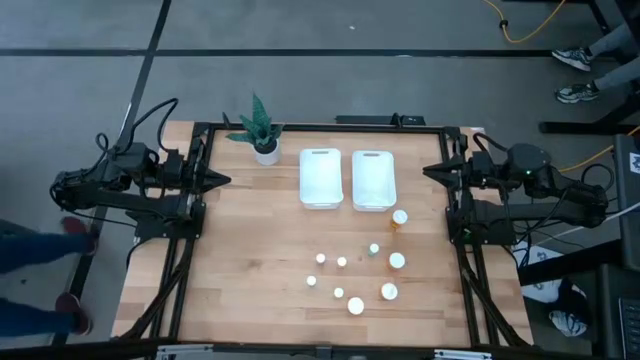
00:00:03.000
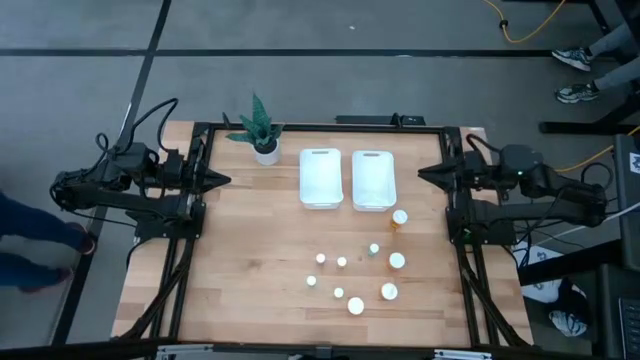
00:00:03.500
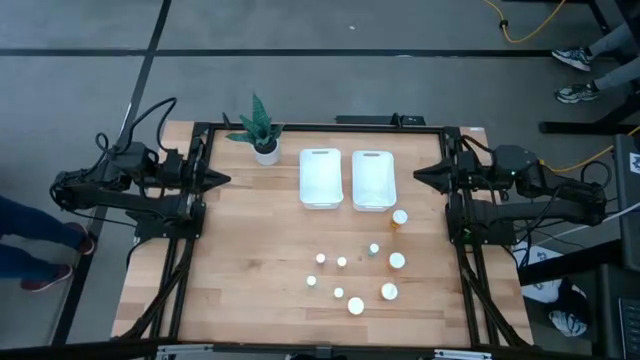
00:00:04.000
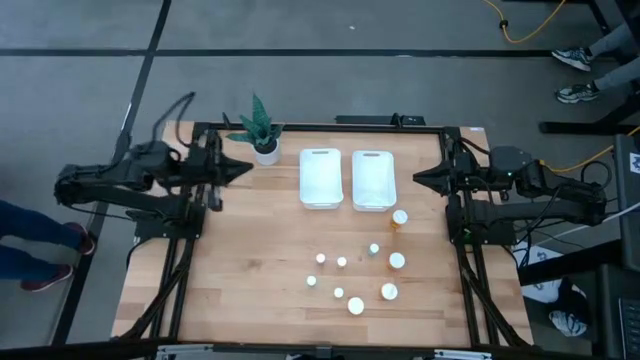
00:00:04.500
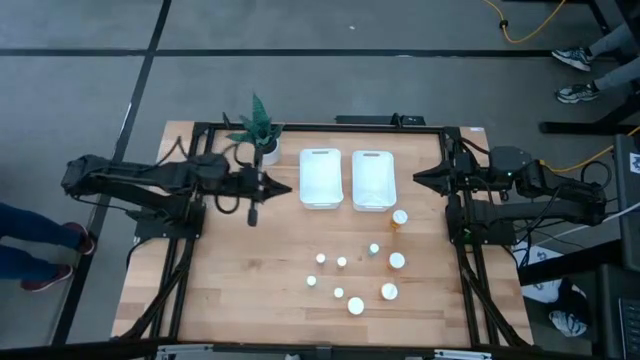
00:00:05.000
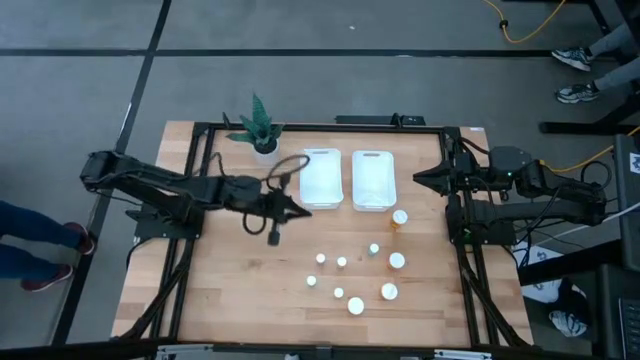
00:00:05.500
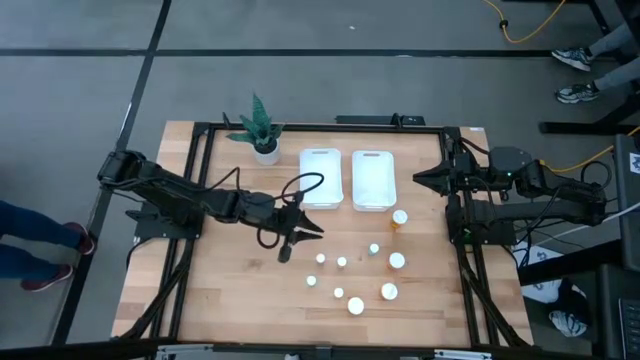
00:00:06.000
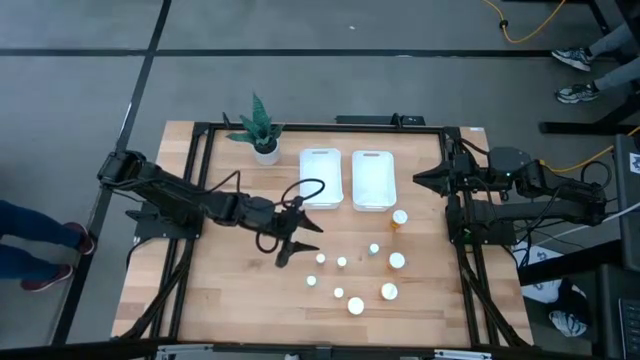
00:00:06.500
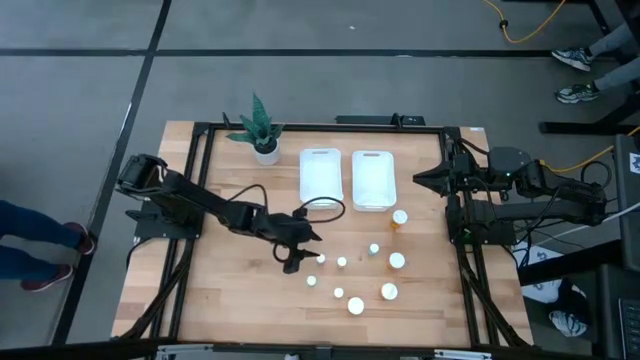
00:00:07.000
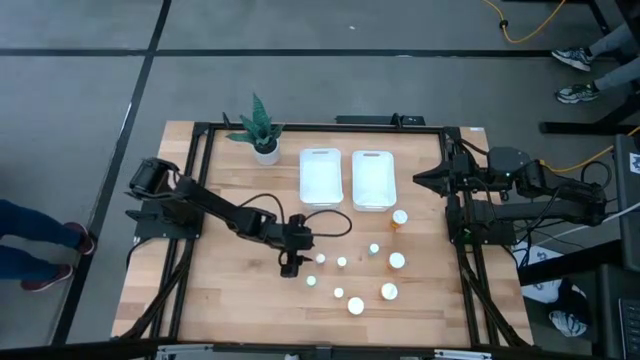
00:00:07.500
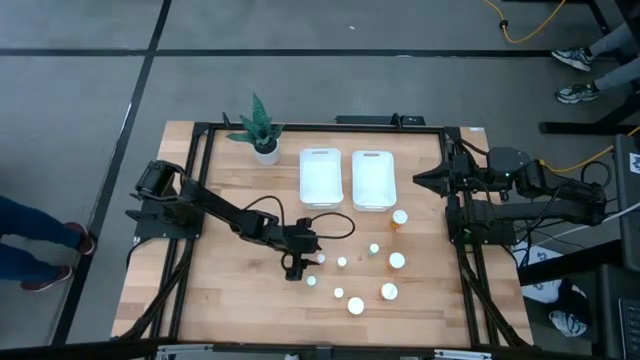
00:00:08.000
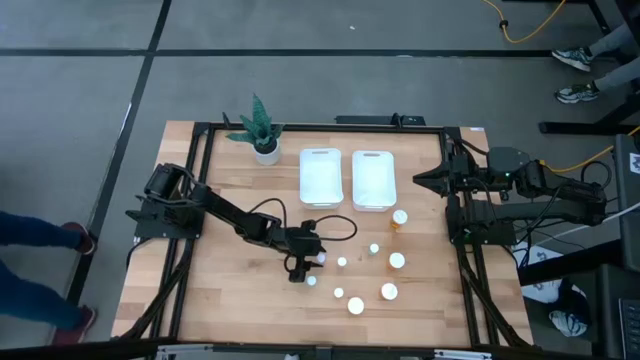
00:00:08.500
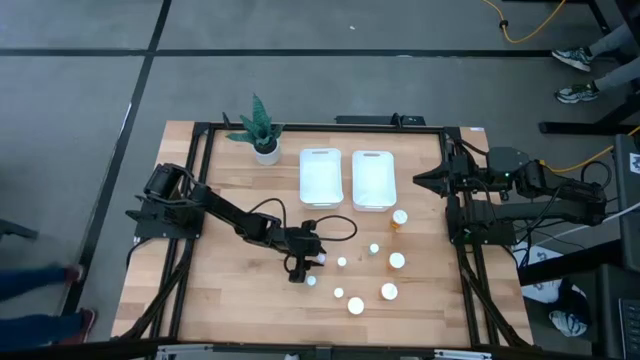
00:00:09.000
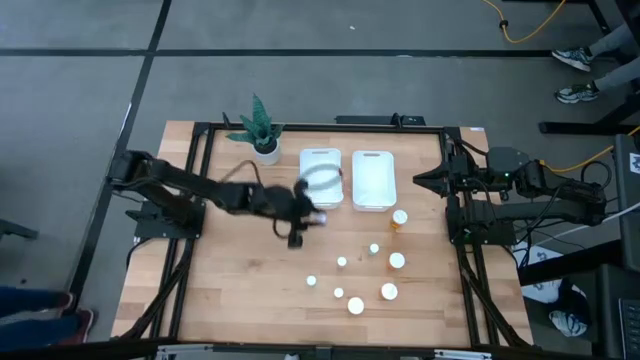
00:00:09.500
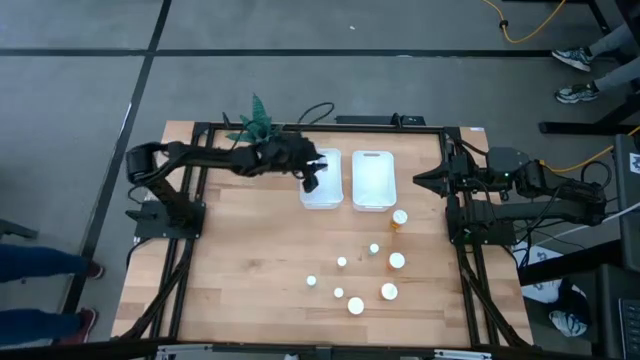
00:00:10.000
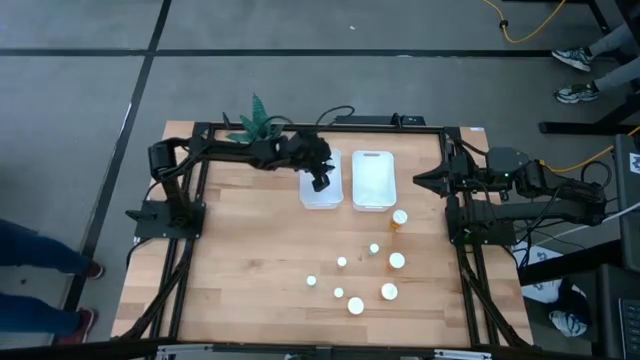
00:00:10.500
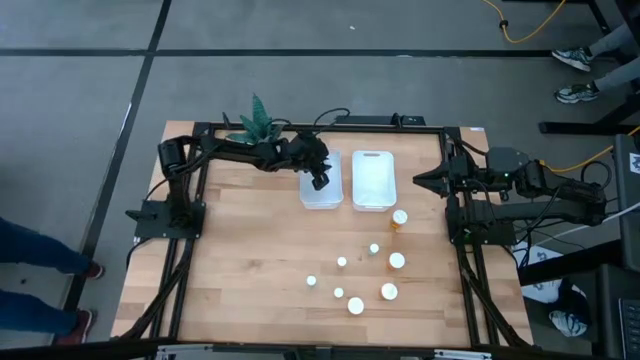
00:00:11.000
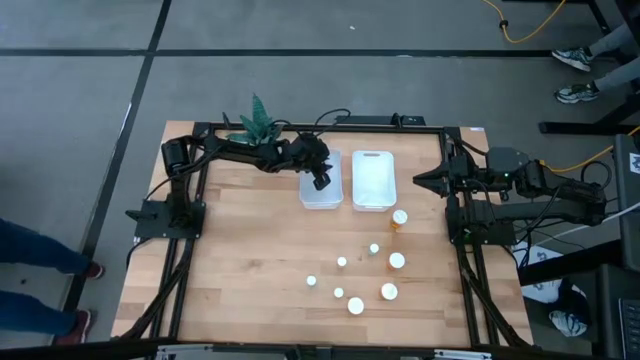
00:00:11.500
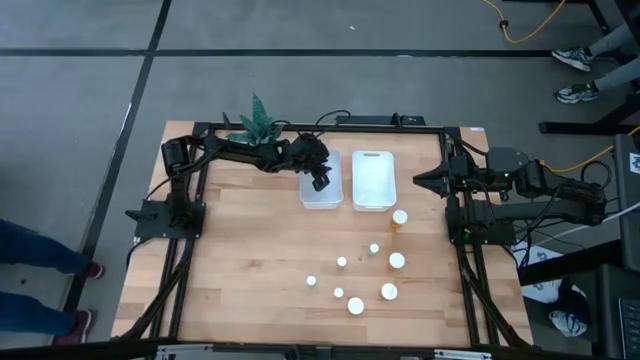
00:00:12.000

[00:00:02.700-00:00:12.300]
Task: Pick and place medicine bottles into bin by pill shape (circle, oval)
Put the purple pill bottle into the left white bin

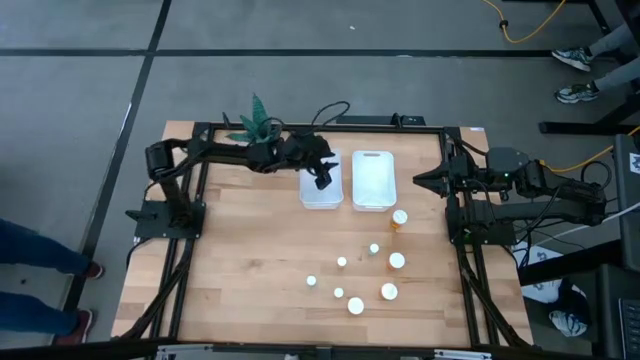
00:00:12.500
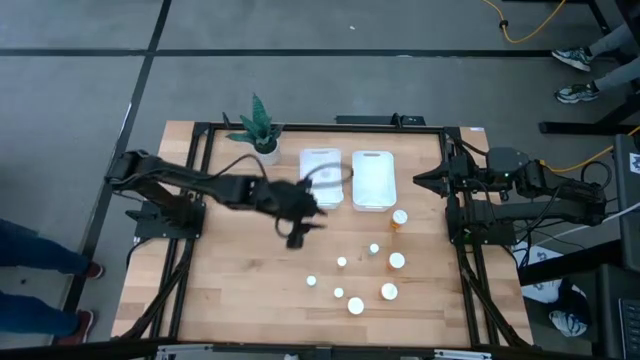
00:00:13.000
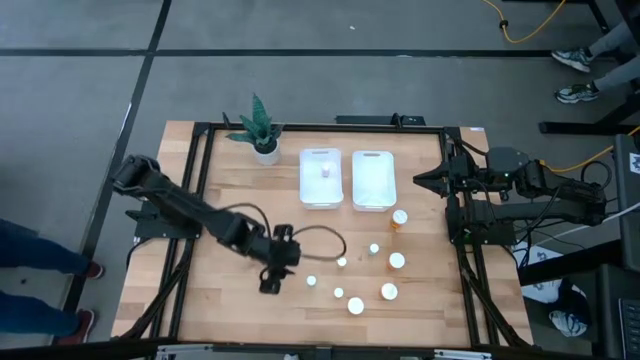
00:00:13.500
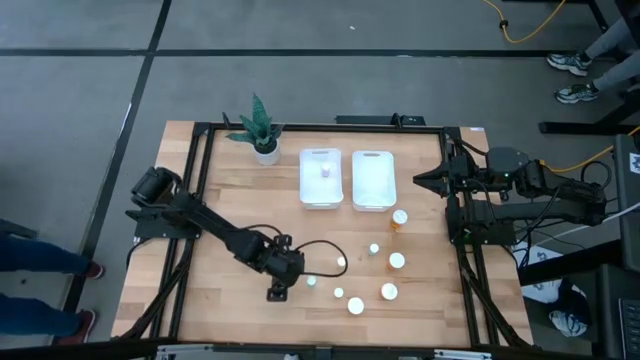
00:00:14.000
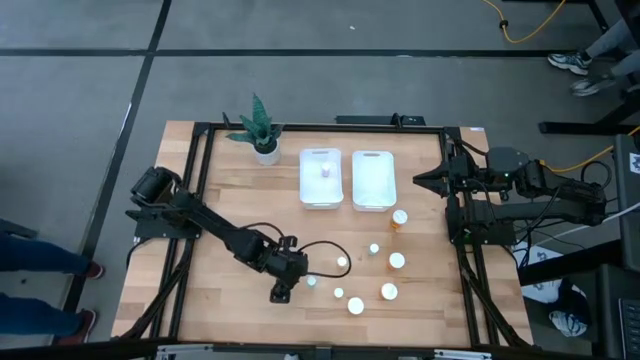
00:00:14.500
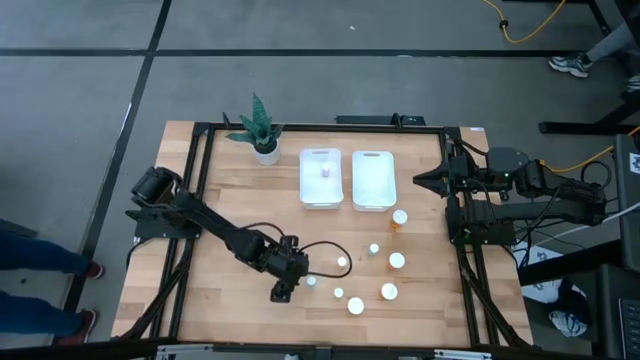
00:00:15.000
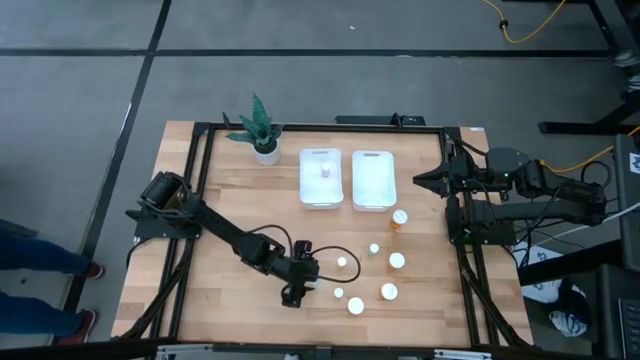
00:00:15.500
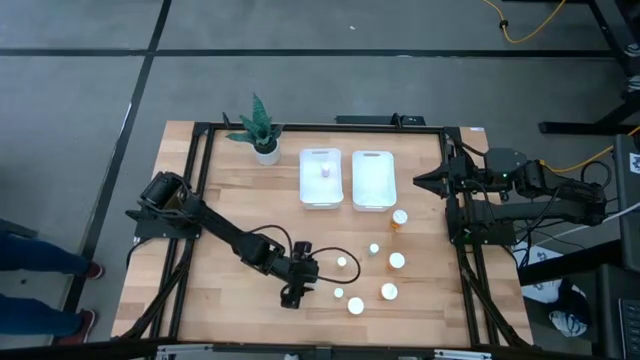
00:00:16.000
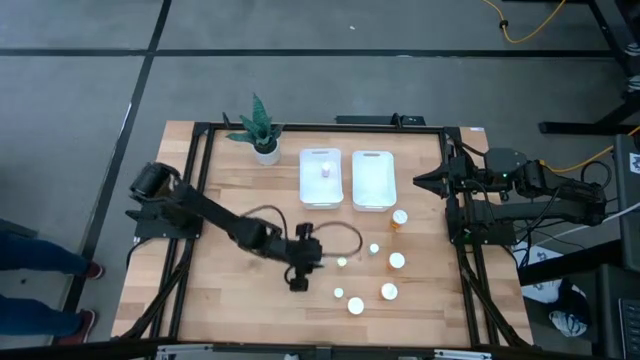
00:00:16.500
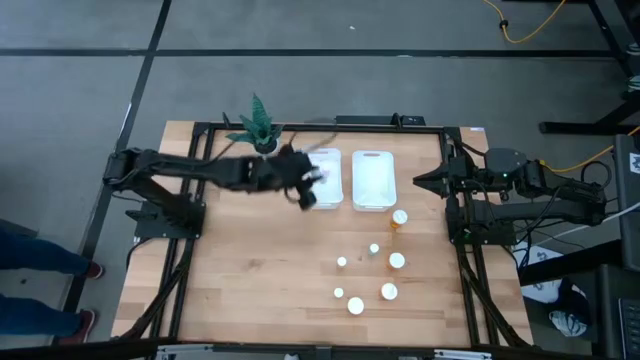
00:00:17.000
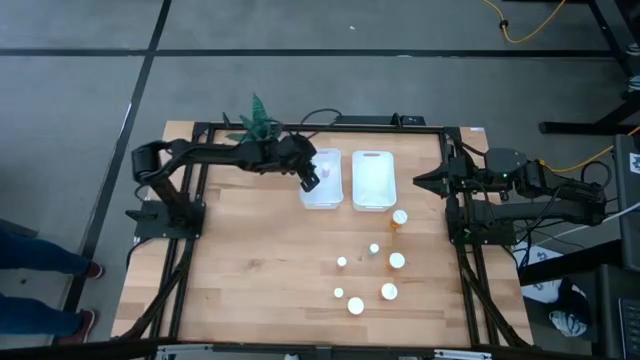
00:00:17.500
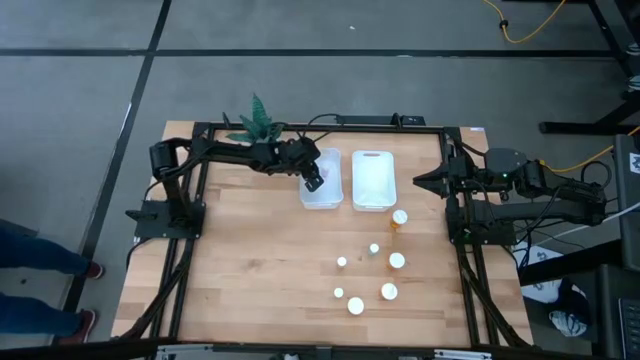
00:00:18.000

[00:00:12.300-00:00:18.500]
Put the bottom green pill bottle into the left white bin

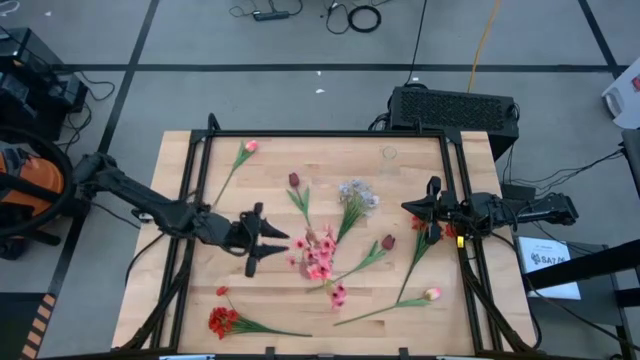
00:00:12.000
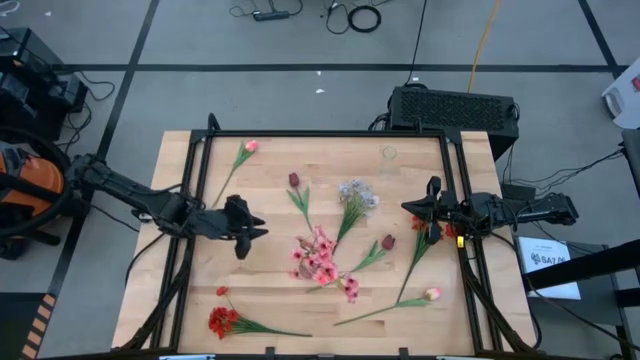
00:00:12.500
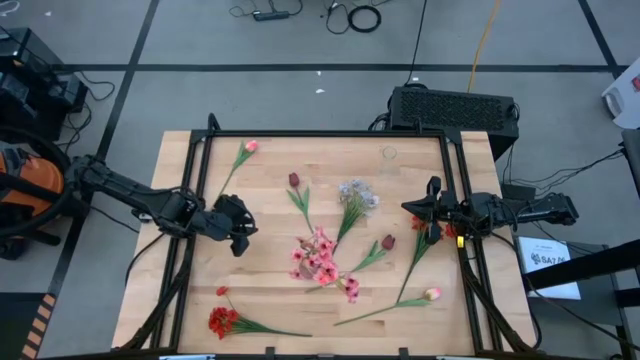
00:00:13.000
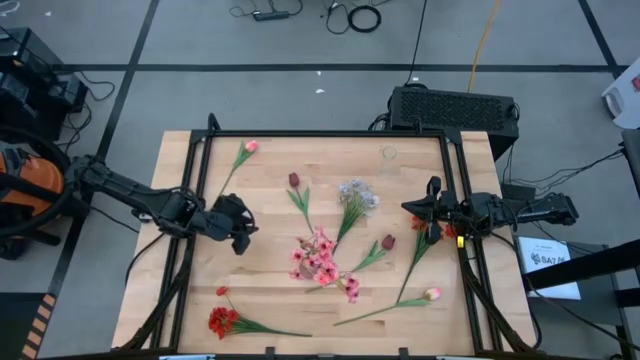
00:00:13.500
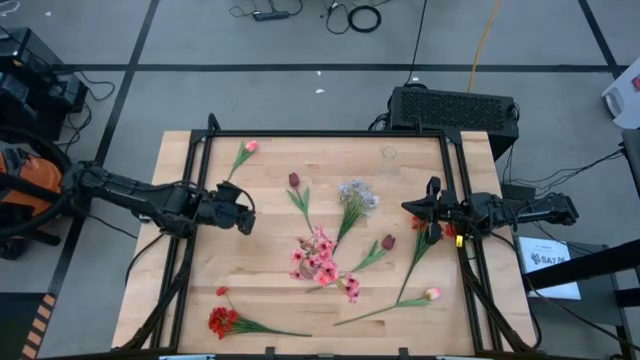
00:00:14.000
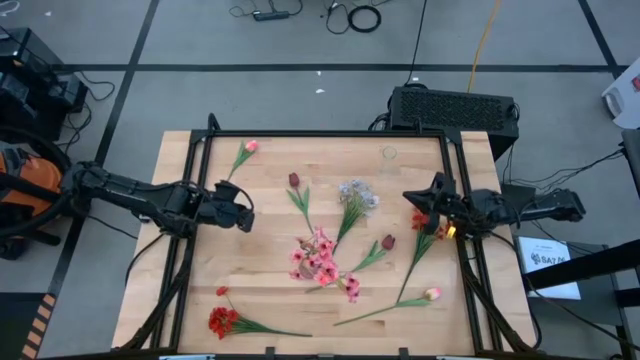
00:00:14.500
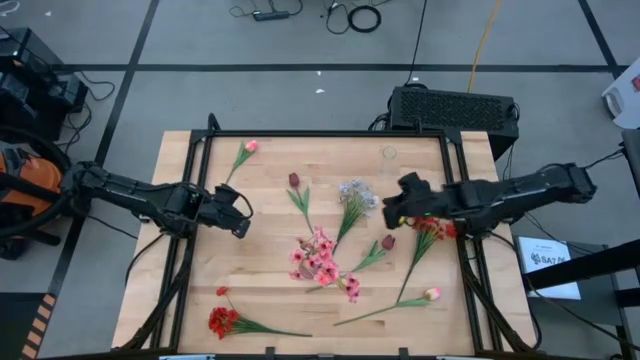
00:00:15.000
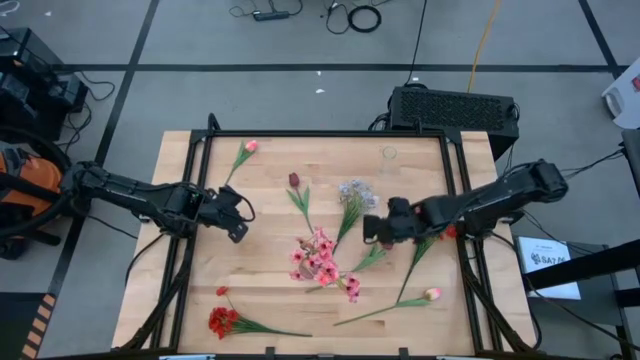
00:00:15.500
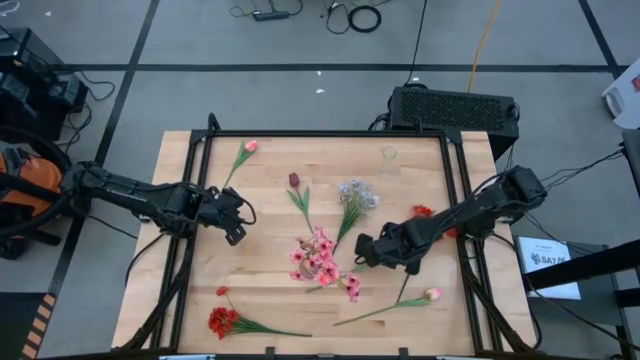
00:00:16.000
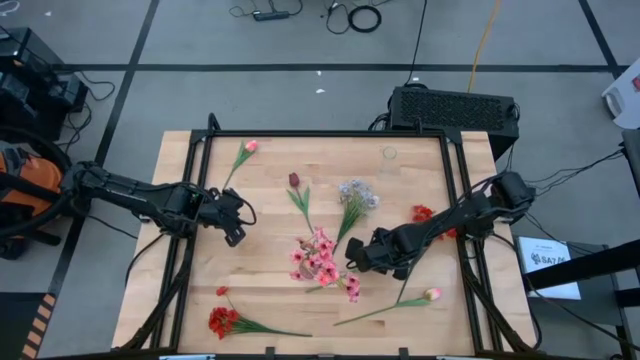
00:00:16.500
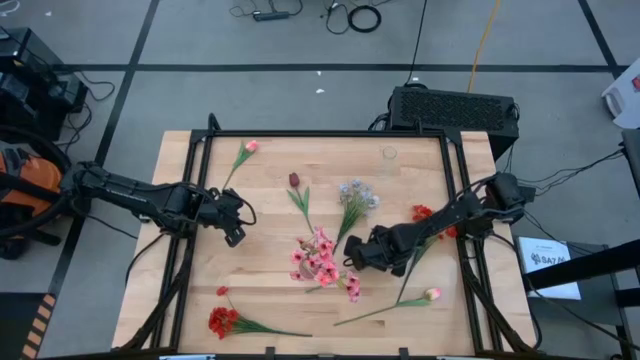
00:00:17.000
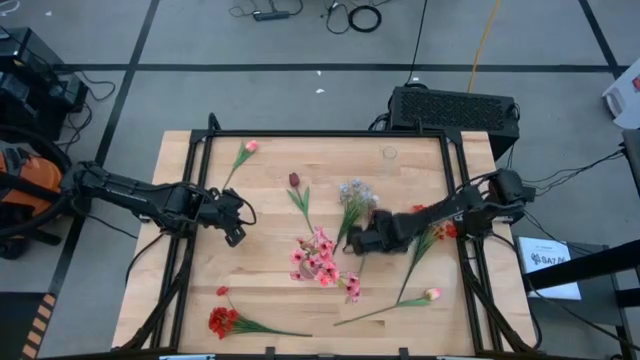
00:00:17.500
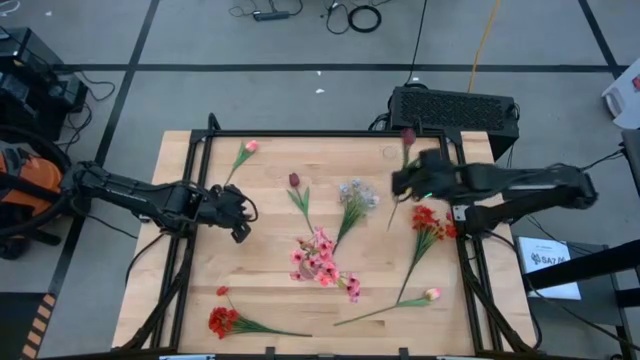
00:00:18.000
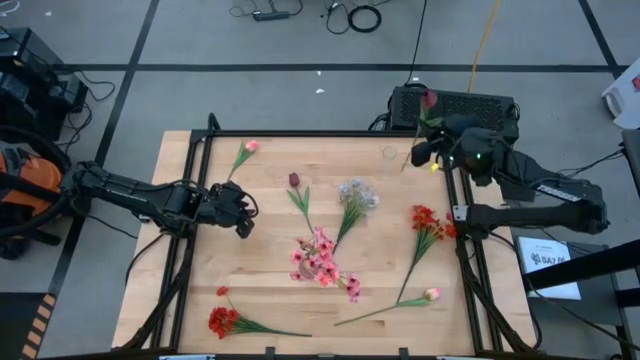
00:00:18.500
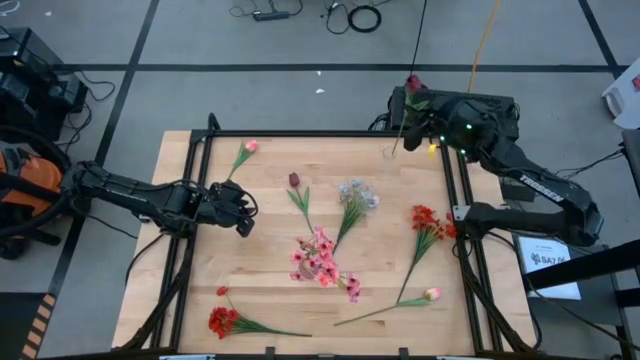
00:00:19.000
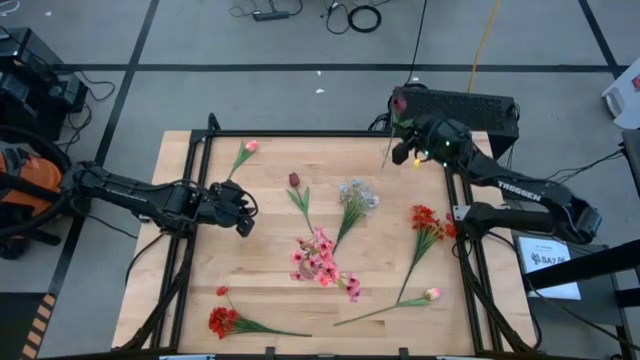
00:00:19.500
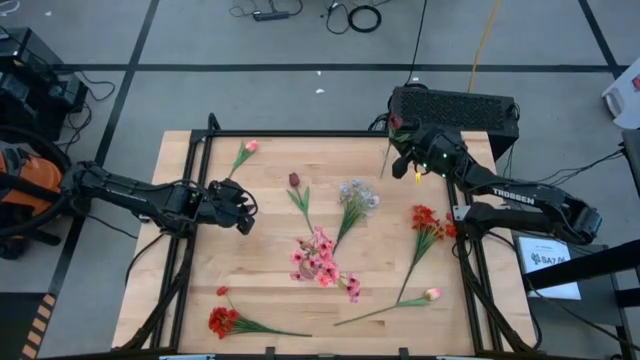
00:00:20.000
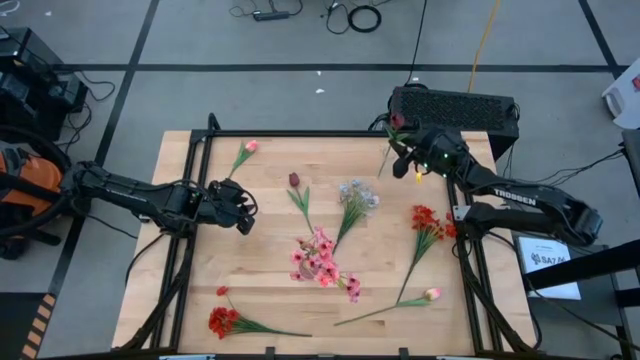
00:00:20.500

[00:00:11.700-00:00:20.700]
Task: Sort flowers into vase by color
Put the bottom dark red flower into the transparent vase
